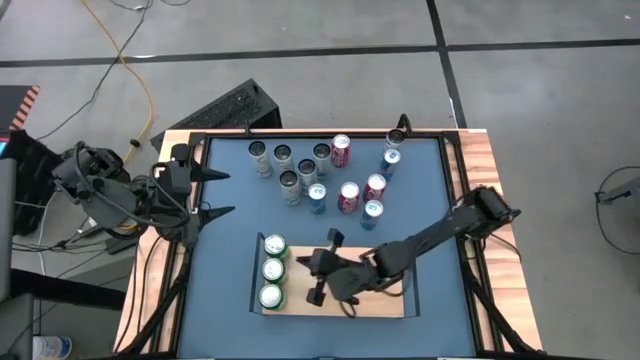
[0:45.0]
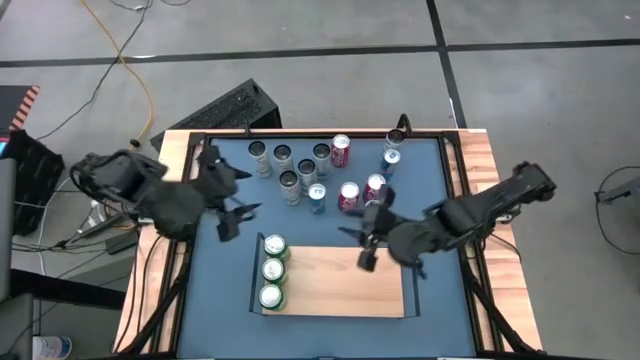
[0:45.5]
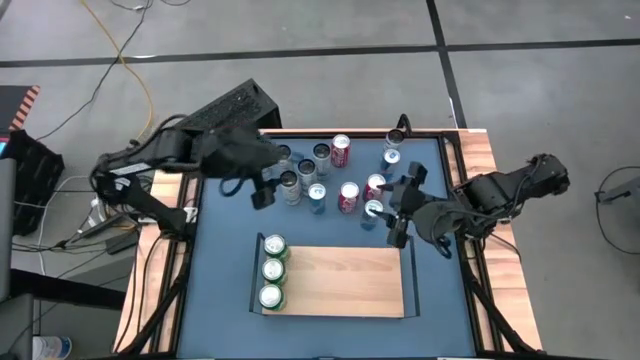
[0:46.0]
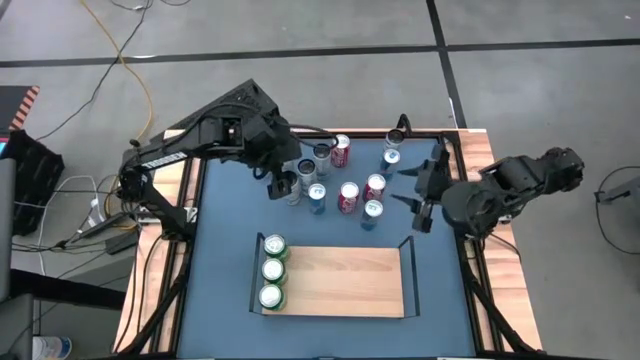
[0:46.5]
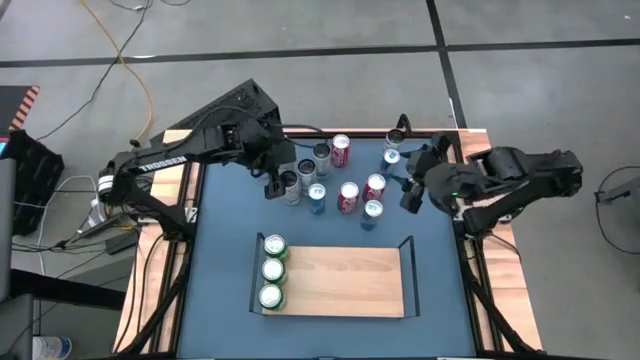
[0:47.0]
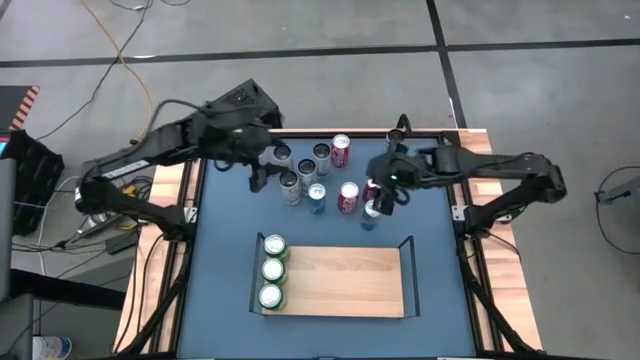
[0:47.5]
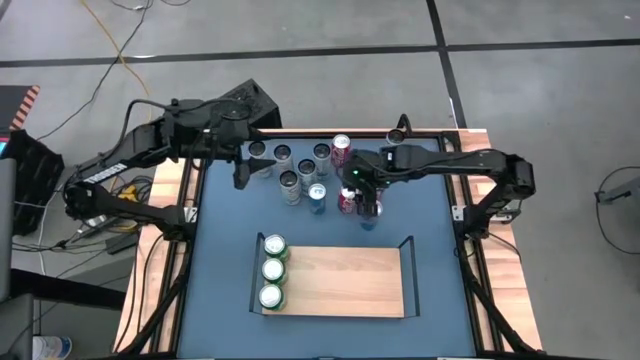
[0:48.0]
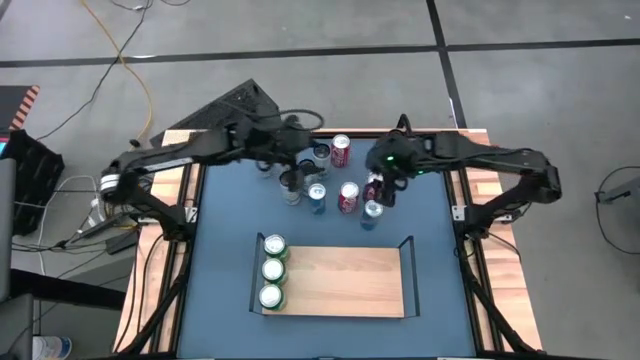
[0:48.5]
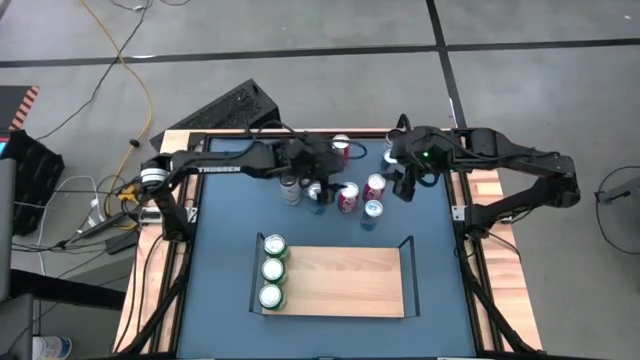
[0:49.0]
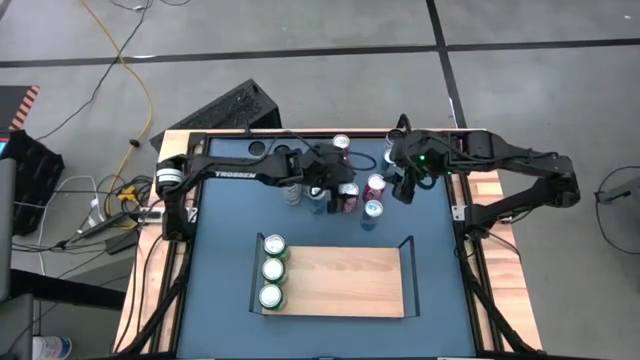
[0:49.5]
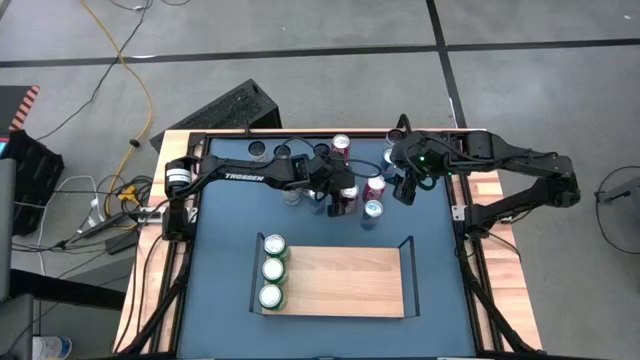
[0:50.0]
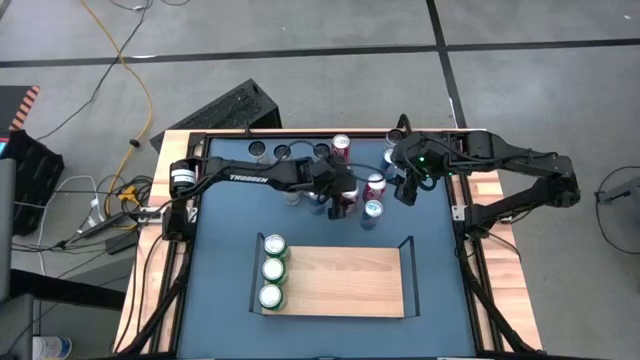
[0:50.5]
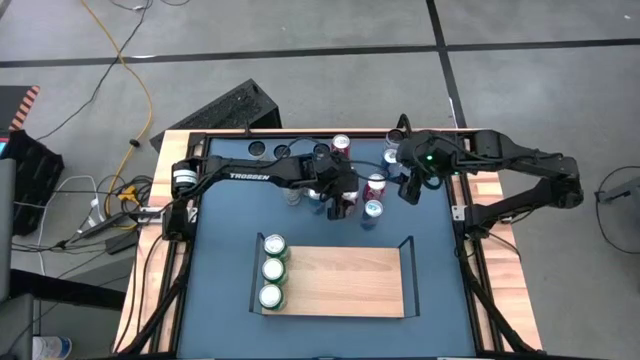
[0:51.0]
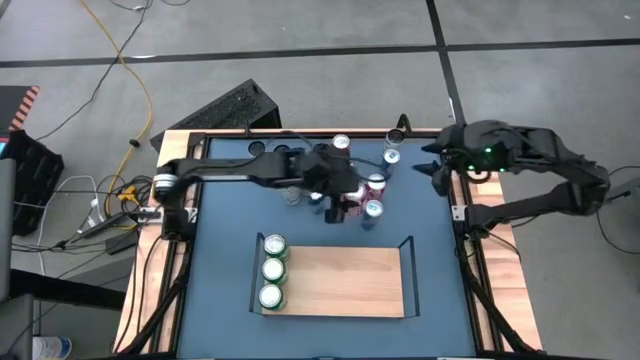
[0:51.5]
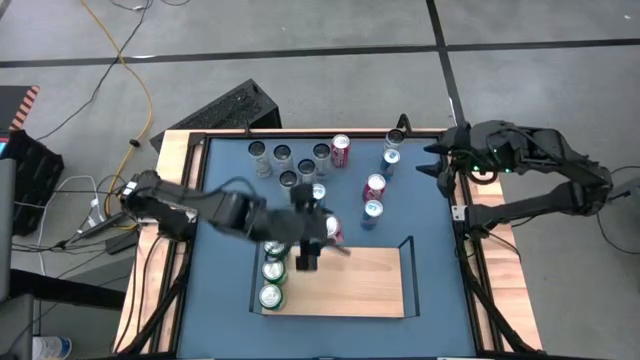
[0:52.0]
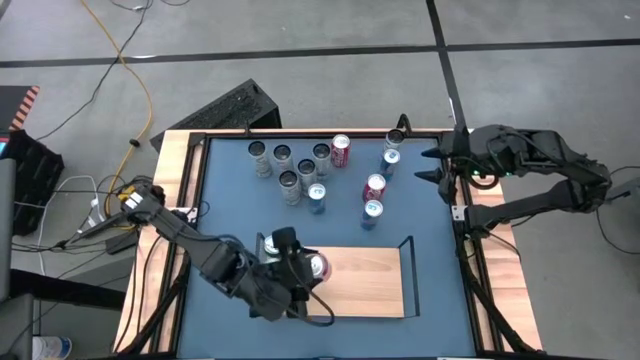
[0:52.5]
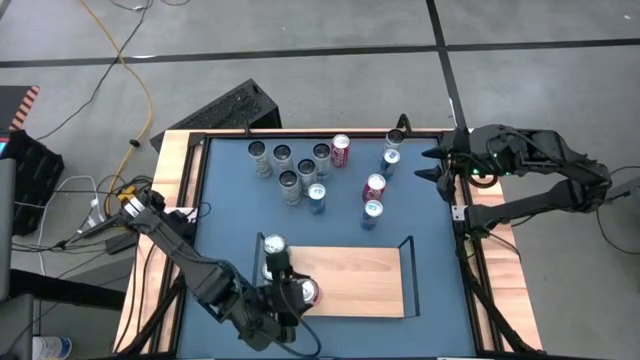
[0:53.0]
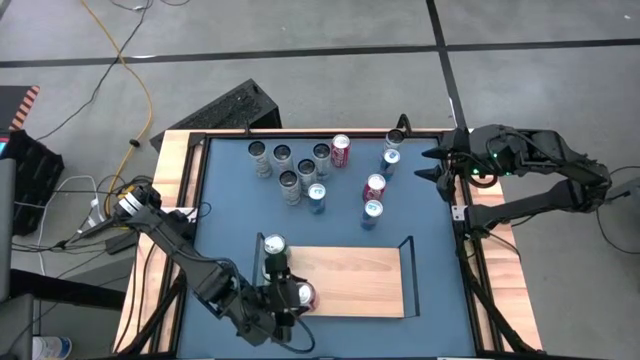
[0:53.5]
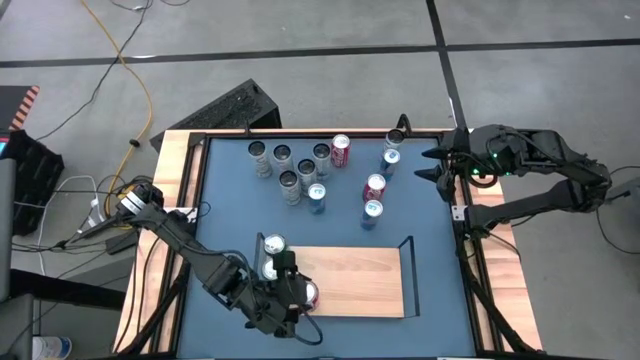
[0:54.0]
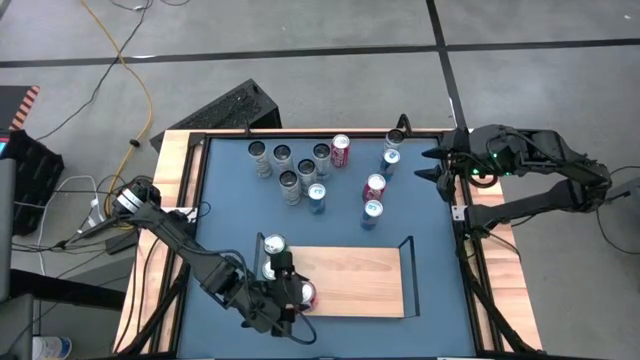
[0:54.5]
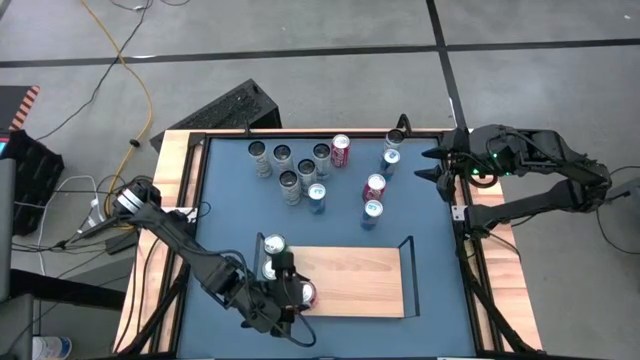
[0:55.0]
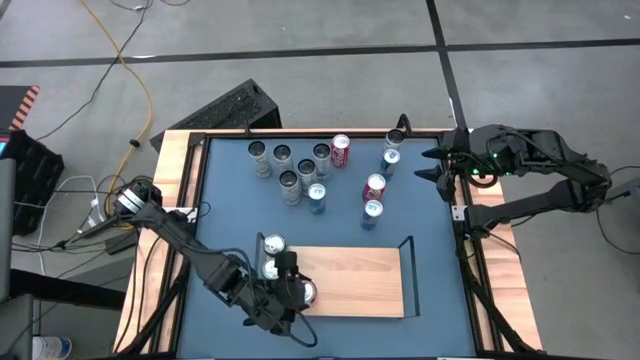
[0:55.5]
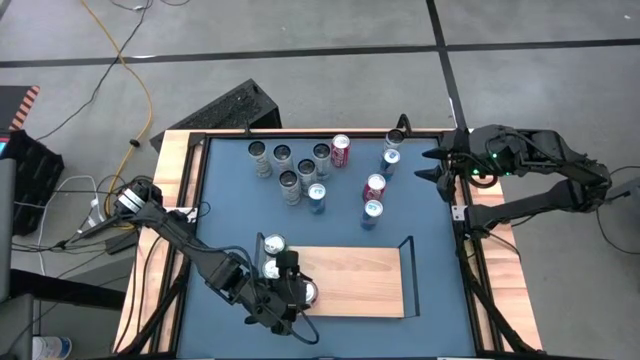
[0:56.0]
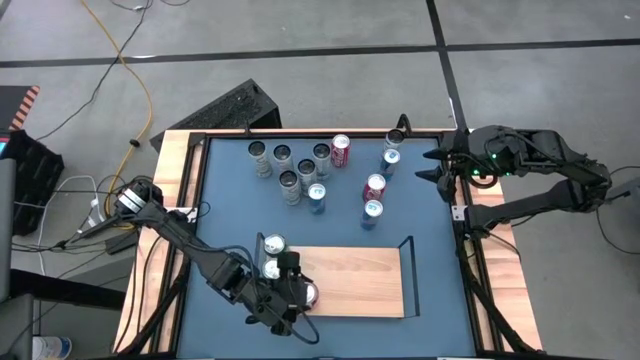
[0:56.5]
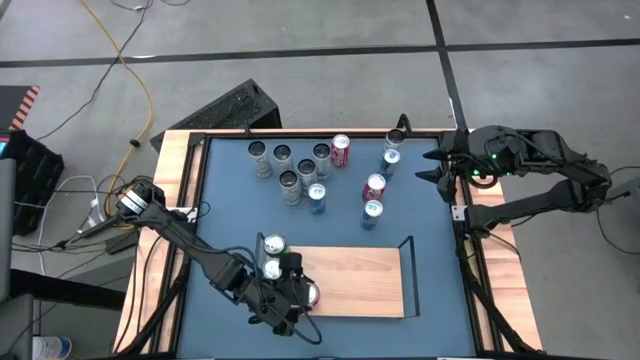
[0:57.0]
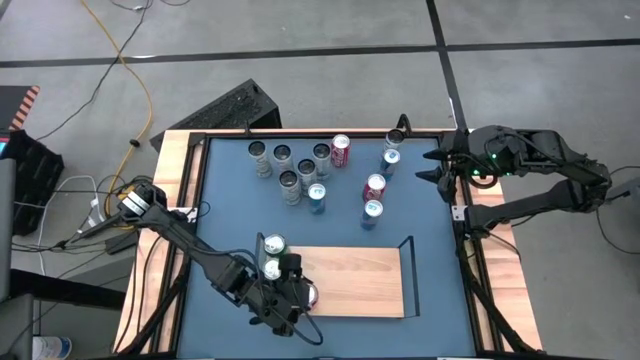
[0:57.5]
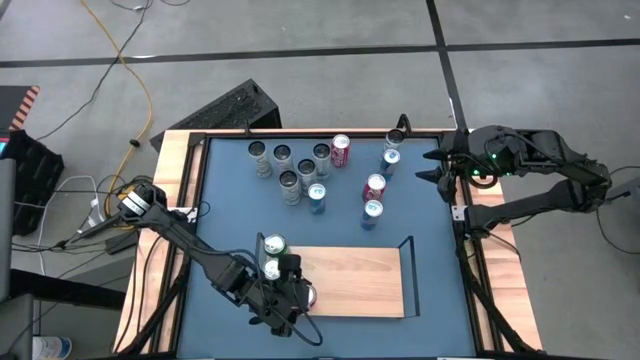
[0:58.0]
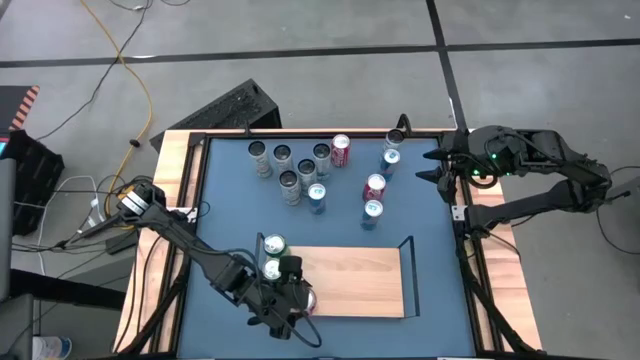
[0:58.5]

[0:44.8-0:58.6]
Task: Place canned beverage on shelf
Put the bottom left red-white soda can on the shelf

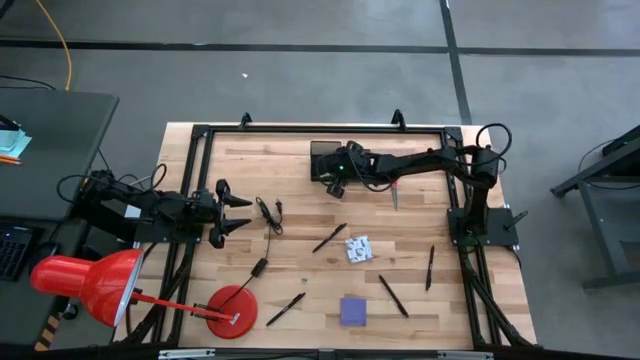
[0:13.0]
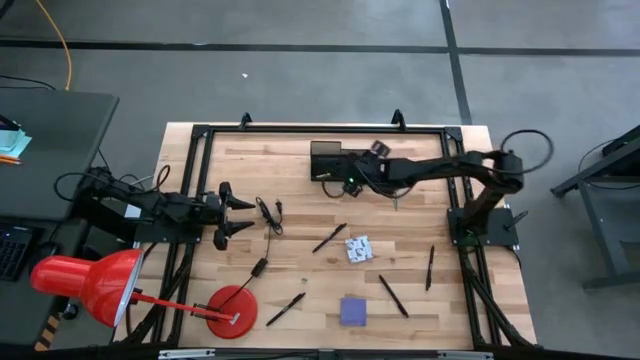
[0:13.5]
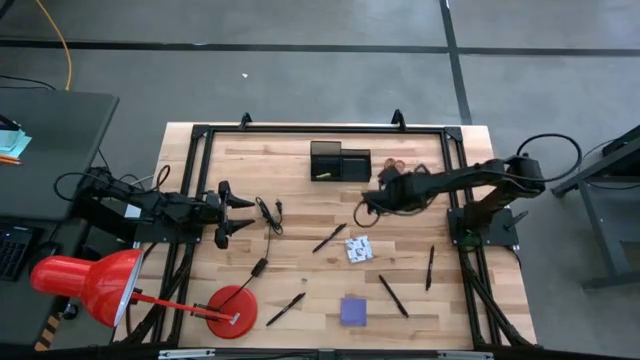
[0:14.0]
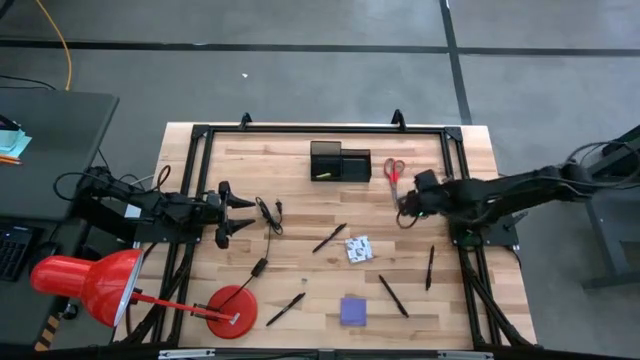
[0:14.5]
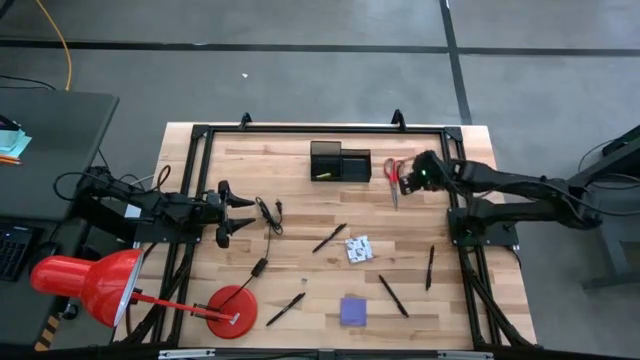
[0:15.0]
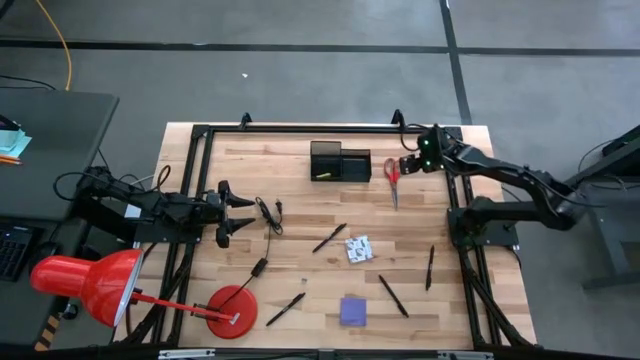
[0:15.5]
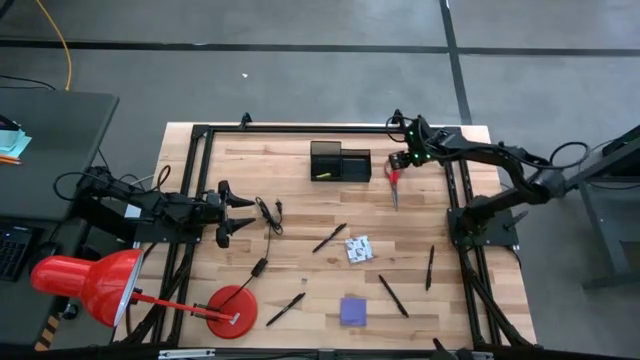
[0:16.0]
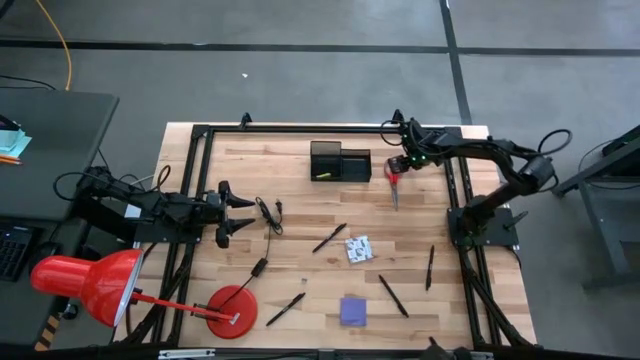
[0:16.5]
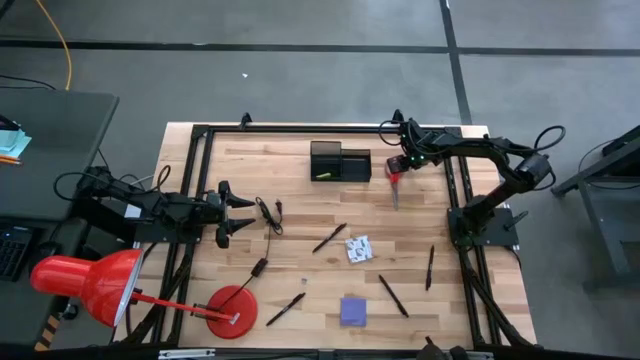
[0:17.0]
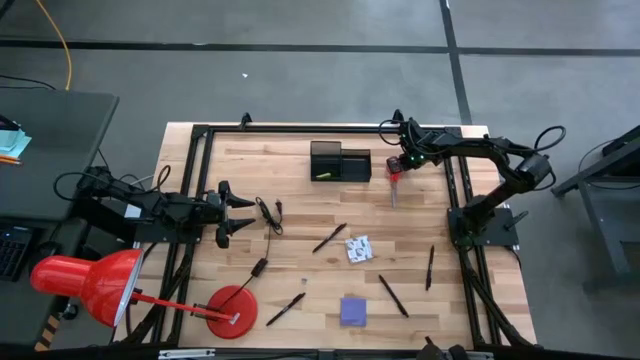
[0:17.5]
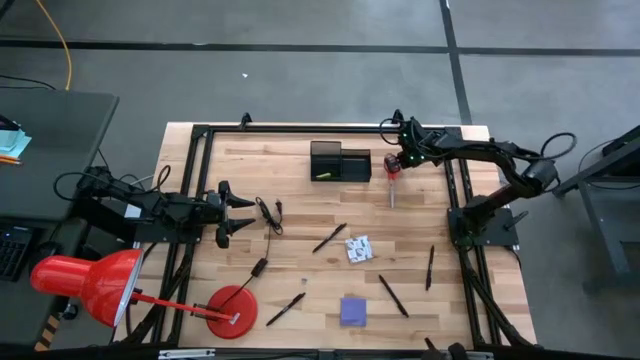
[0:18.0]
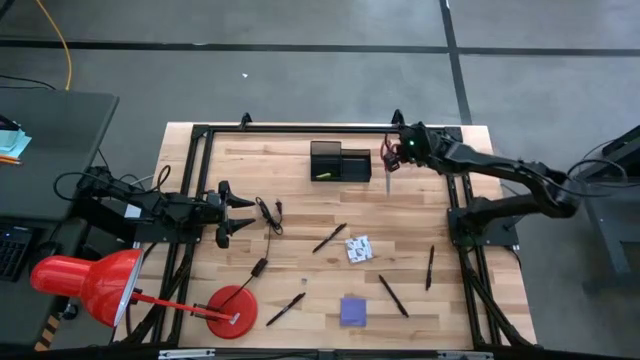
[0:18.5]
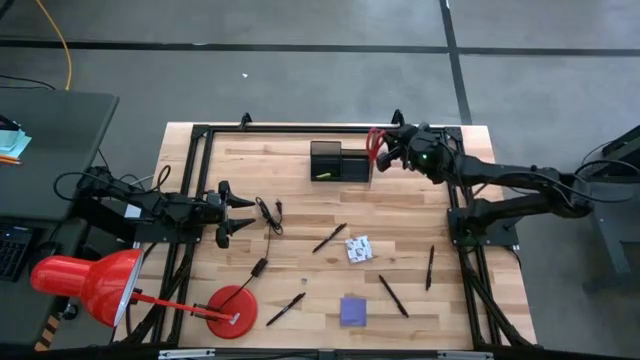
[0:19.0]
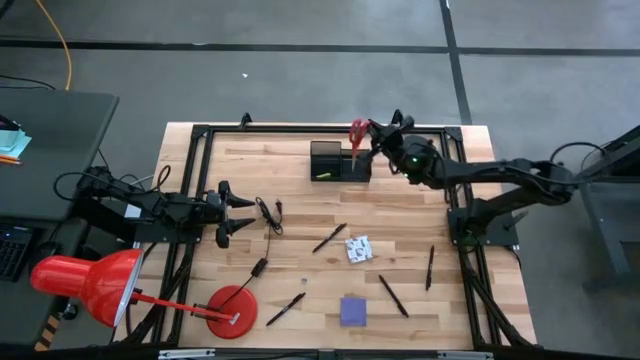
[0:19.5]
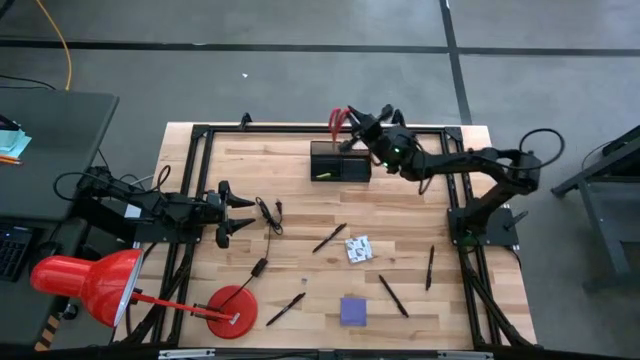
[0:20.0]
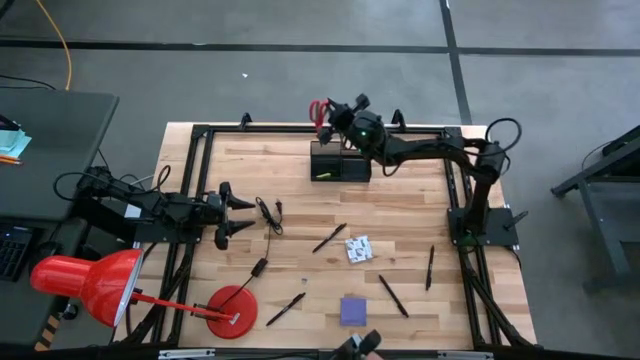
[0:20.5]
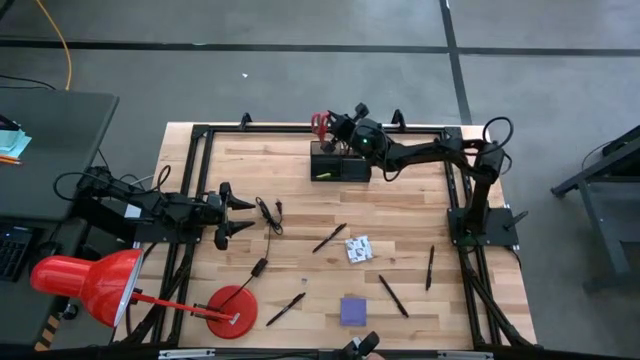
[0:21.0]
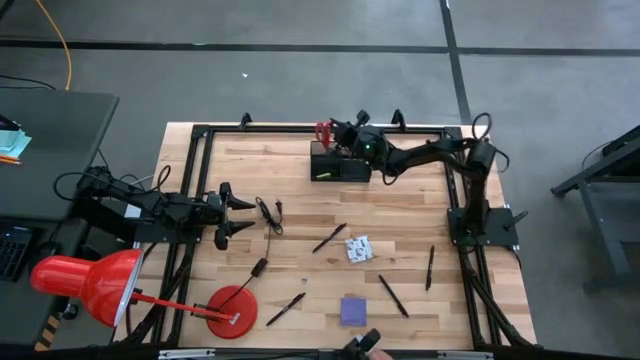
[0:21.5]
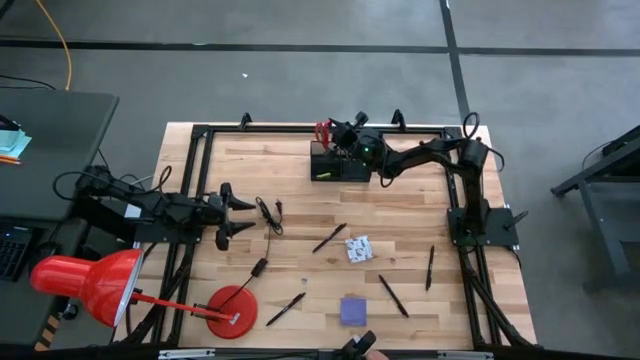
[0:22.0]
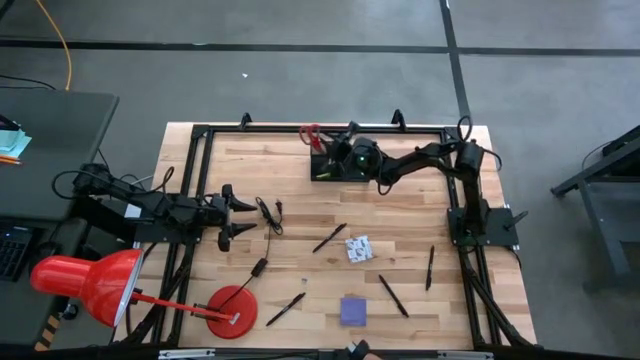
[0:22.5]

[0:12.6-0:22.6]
Task: Pick and place office supplies into organizer
Put the red scissors into the mesh desk organizer
